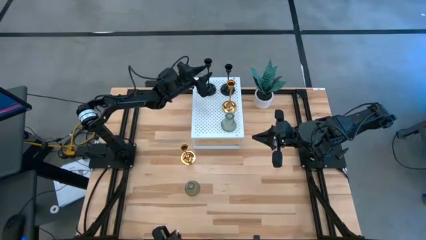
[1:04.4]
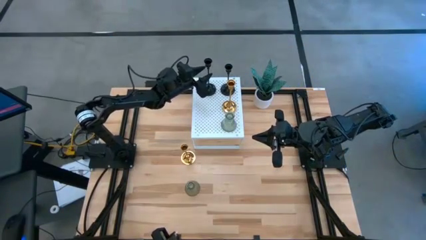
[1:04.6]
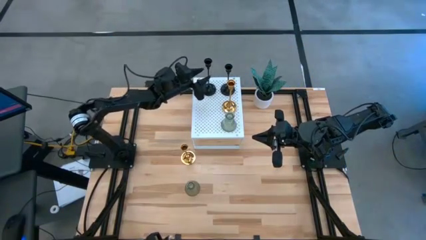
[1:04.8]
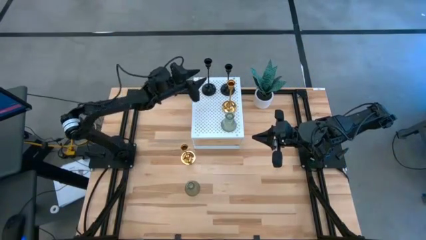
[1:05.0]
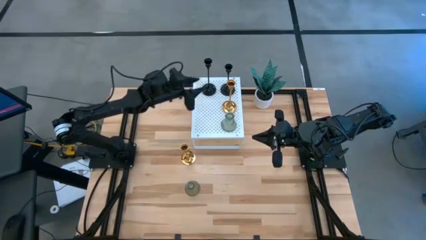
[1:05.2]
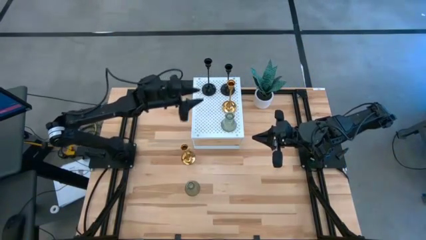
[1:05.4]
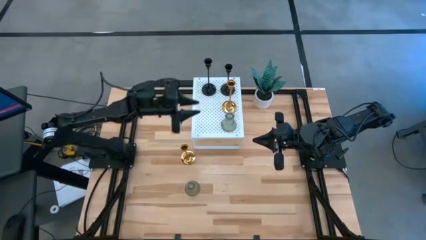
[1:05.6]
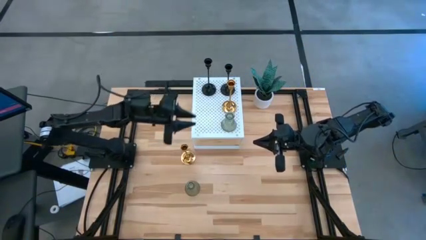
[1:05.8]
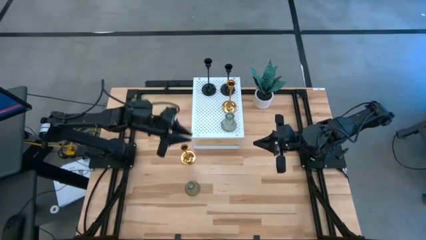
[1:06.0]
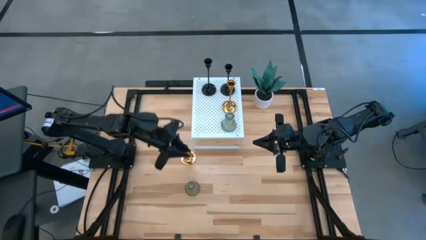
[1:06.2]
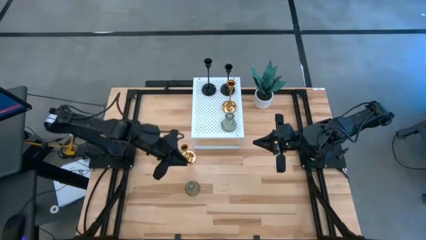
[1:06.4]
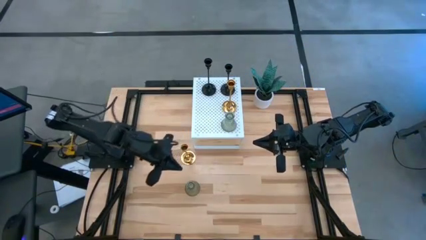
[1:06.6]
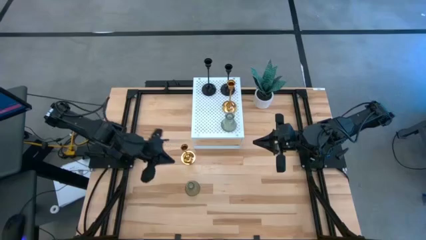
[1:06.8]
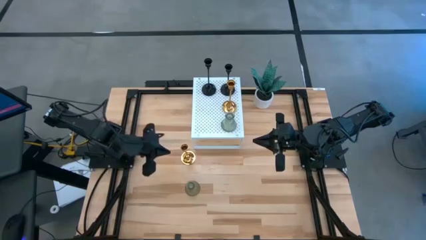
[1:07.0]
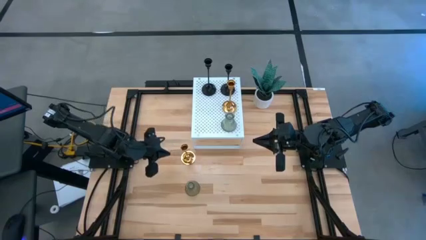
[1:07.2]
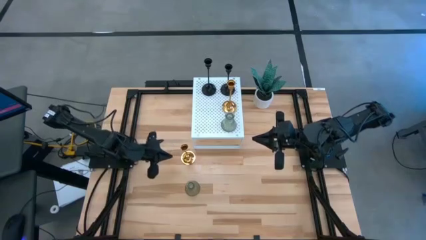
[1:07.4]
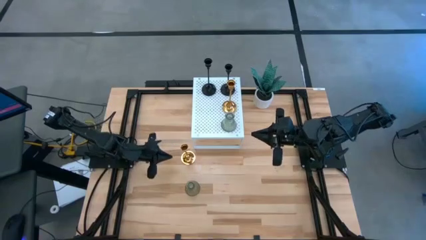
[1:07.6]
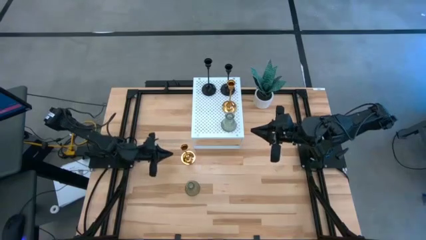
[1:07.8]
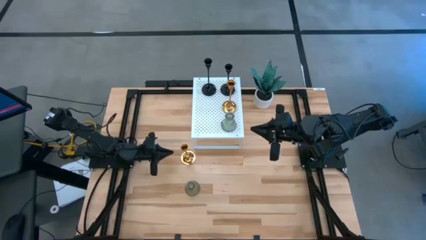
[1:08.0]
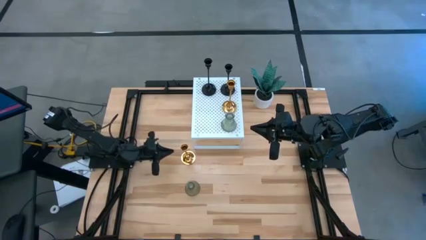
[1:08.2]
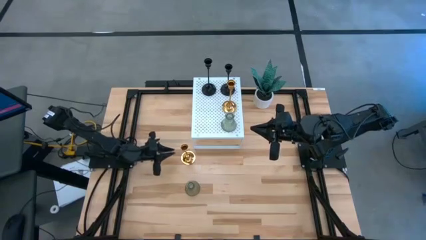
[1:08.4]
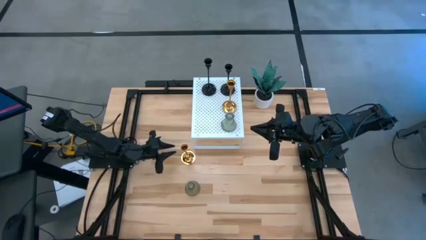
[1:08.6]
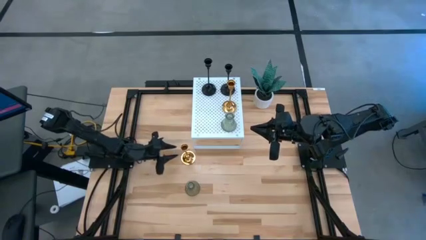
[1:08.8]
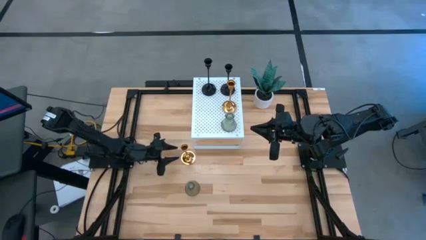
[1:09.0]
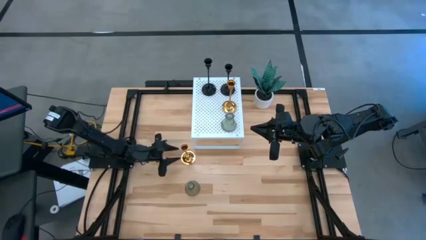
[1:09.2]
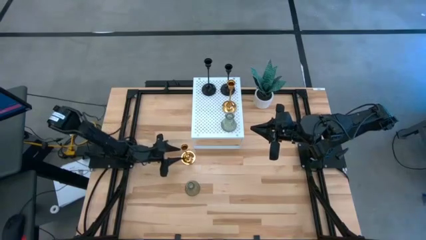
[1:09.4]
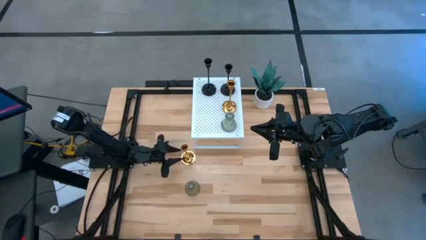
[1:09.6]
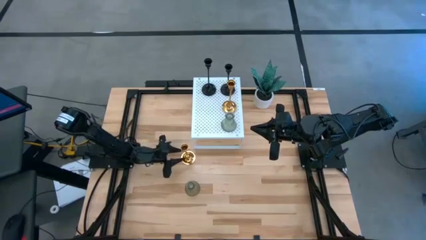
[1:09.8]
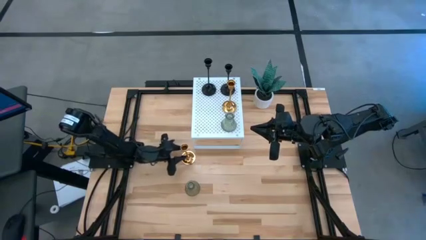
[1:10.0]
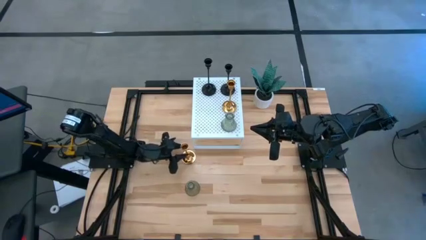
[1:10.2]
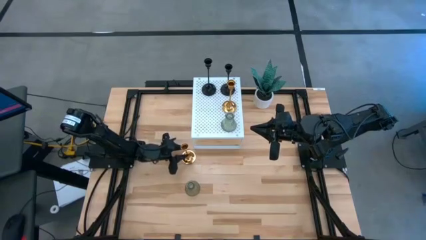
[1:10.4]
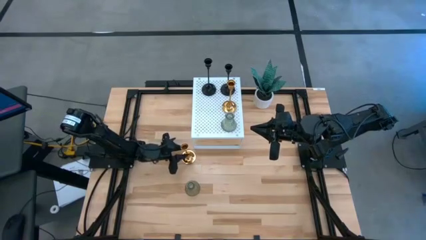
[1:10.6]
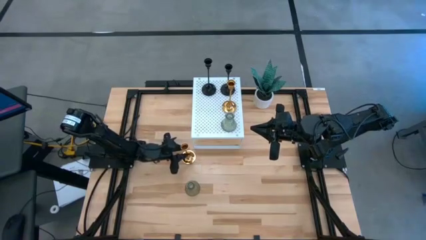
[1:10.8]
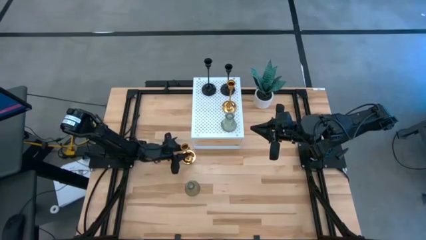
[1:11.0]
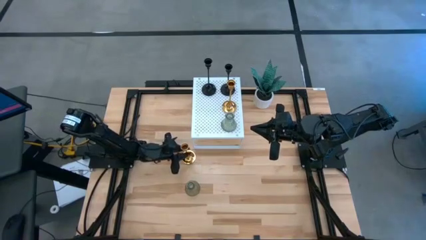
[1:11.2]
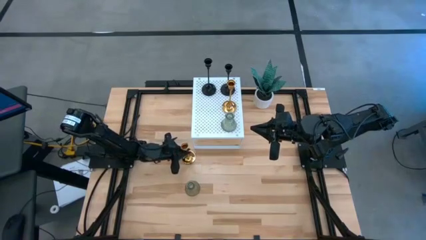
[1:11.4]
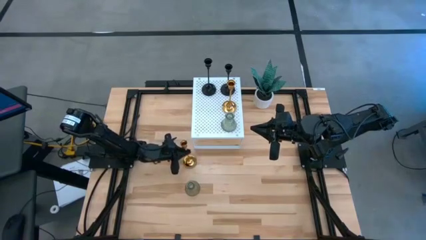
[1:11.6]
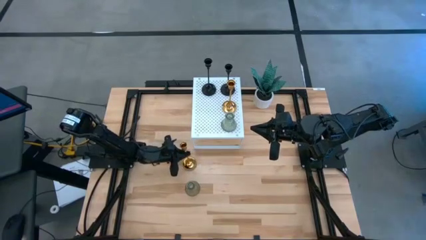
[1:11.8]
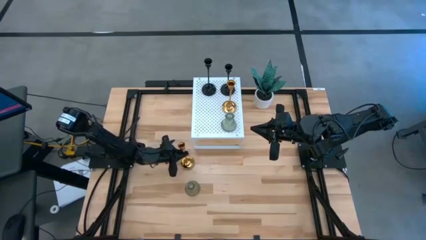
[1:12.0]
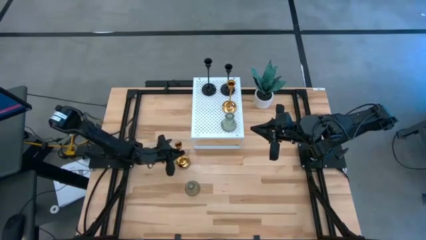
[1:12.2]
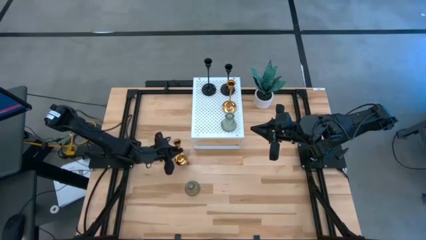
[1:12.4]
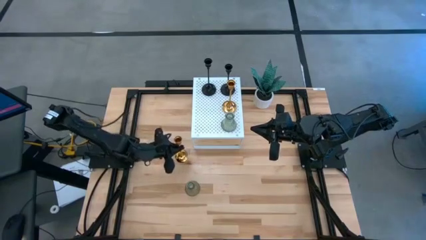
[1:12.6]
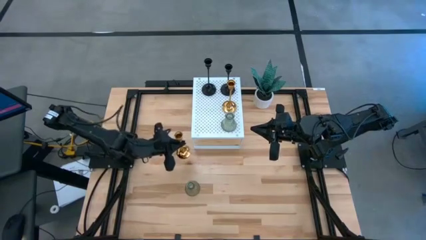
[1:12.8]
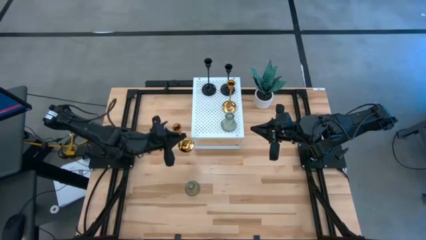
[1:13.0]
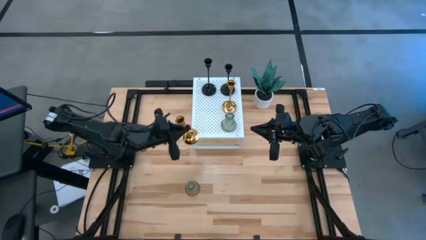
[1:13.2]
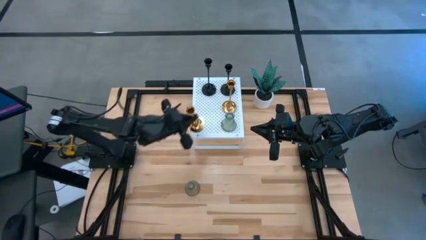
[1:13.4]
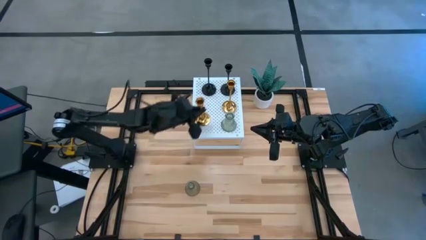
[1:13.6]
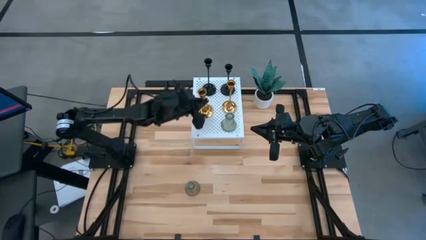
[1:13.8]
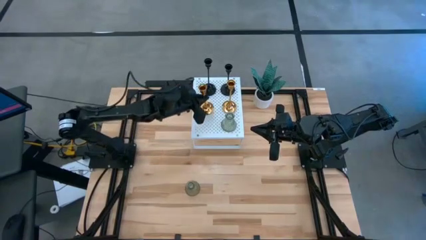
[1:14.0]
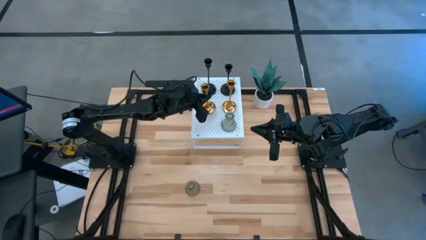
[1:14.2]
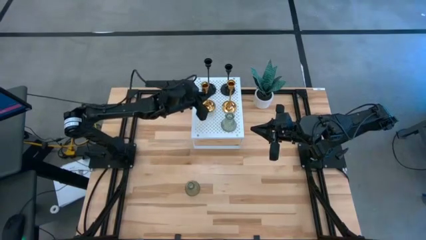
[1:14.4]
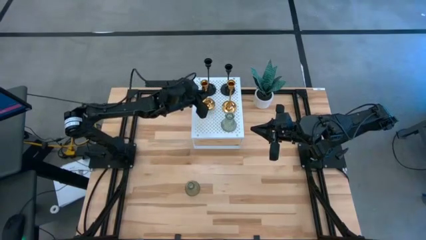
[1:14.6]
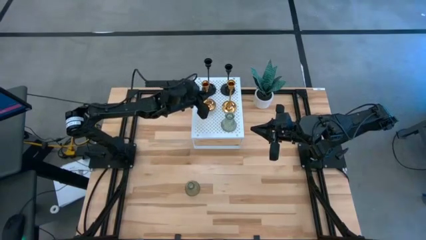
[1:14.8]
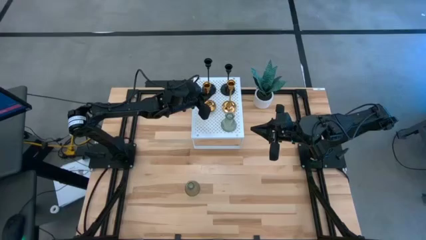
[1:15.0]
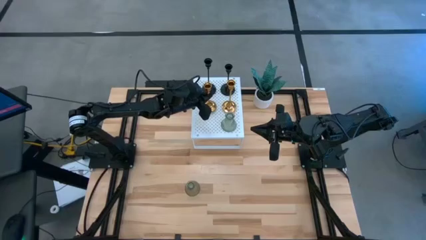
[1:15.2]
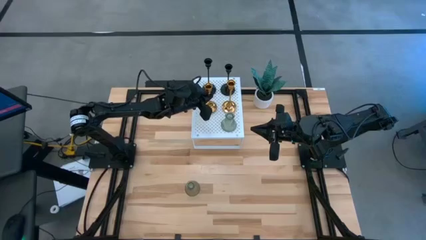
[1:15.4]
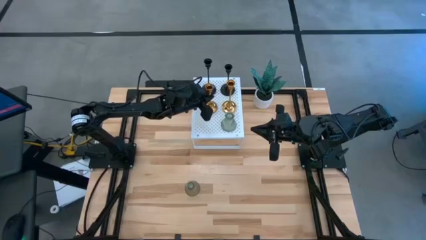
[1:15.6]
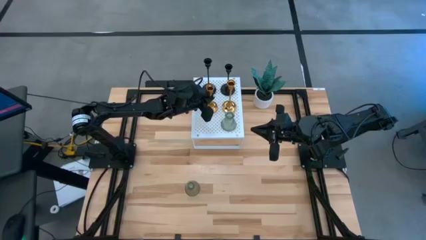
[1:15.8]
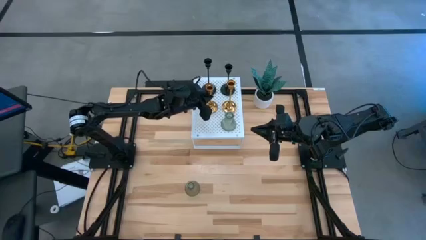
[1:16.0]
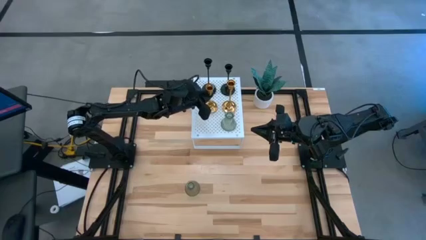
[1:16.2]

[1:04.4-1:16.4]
Task: Pick & Place candle stick holders
Put the gold candle holder aligned with the other gold candle holder on the shelf
